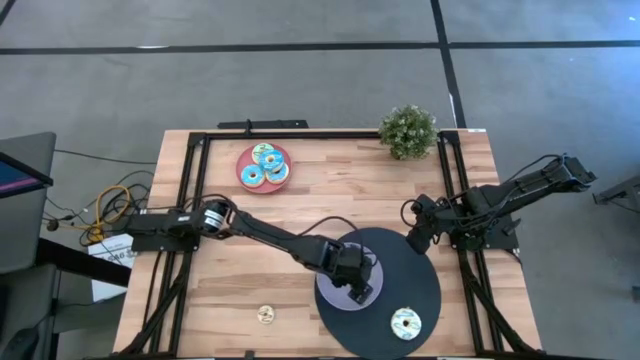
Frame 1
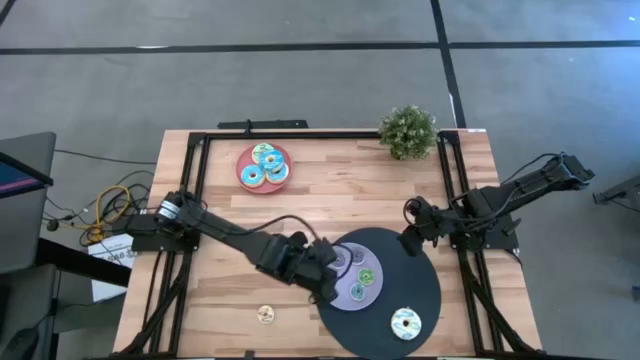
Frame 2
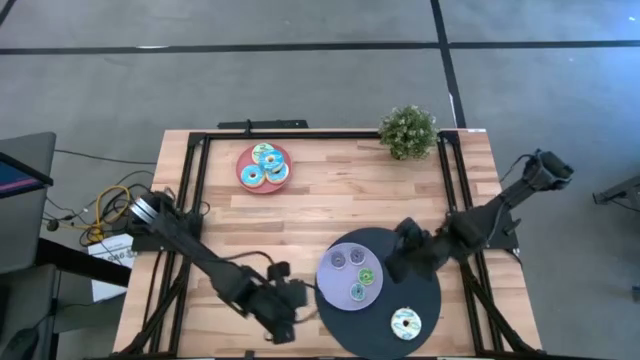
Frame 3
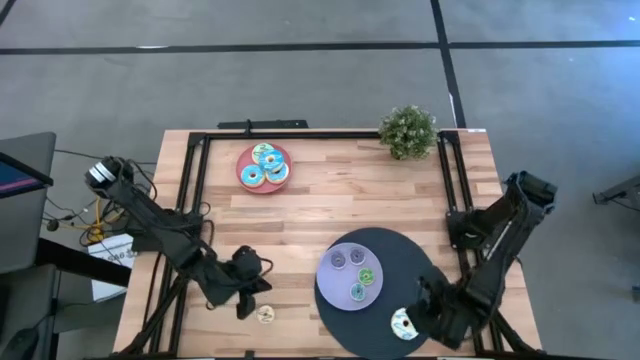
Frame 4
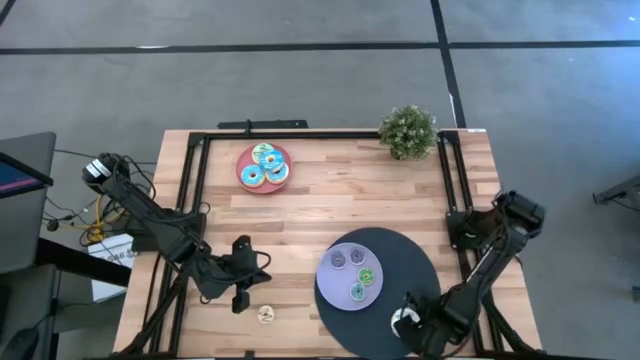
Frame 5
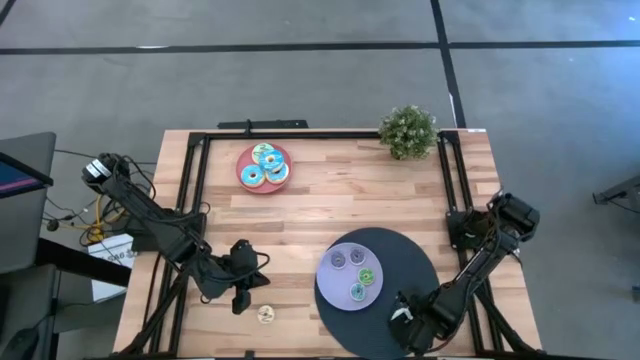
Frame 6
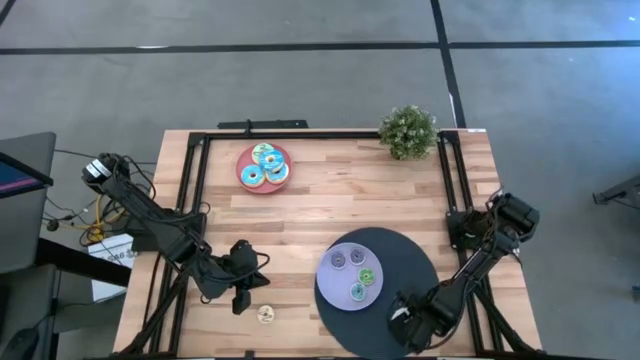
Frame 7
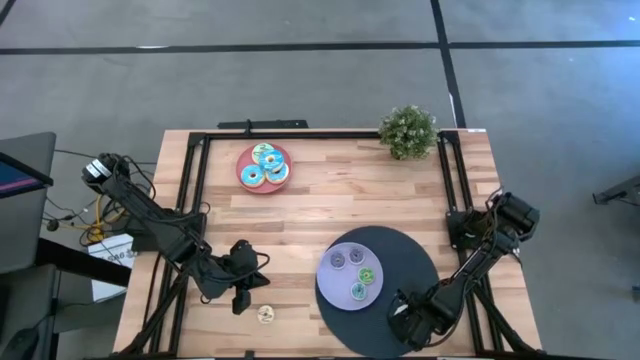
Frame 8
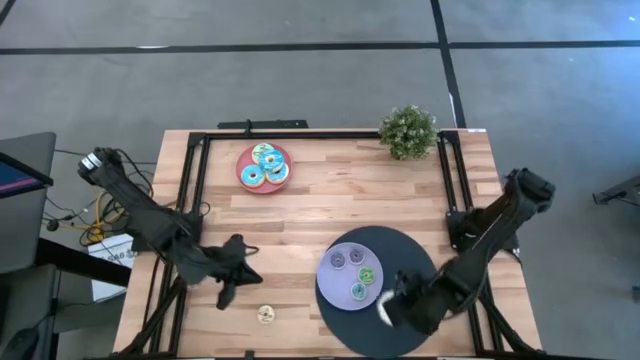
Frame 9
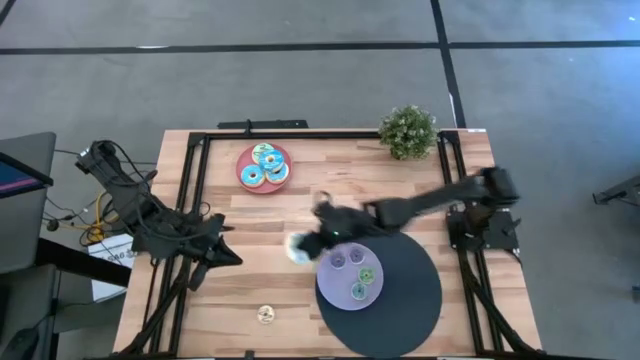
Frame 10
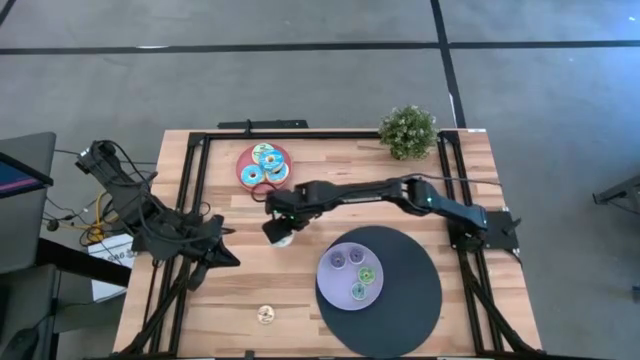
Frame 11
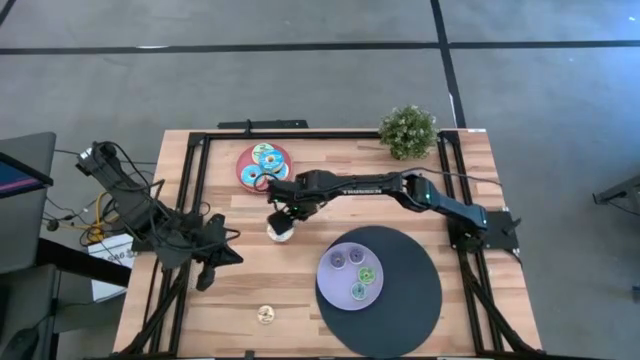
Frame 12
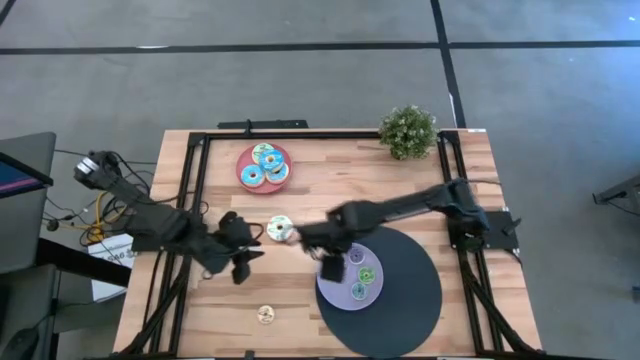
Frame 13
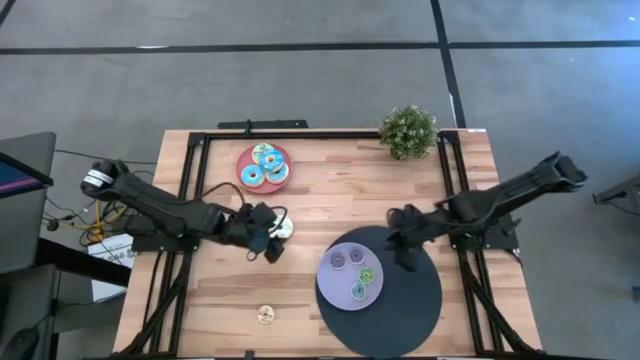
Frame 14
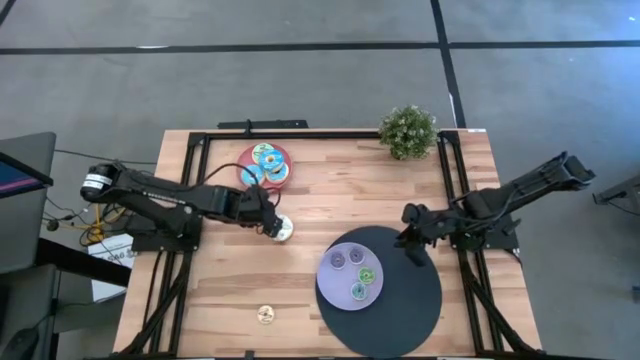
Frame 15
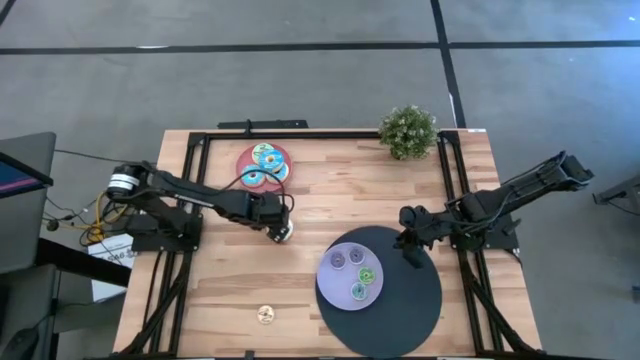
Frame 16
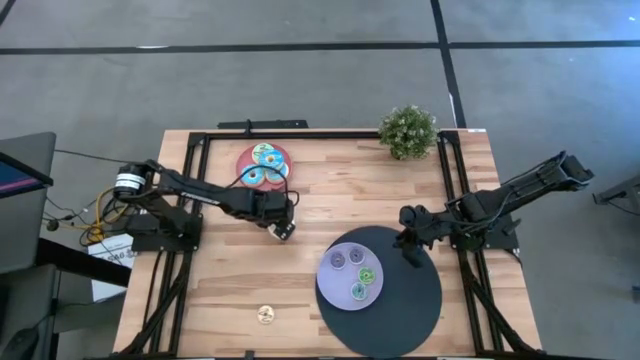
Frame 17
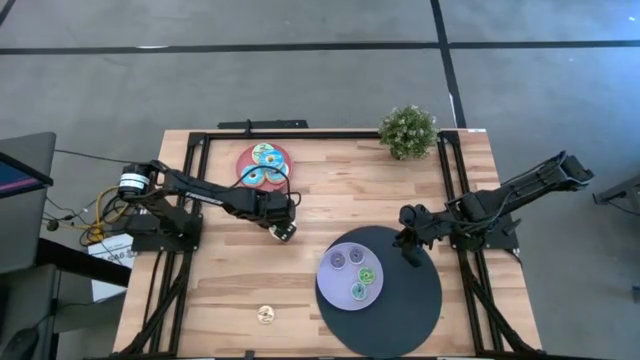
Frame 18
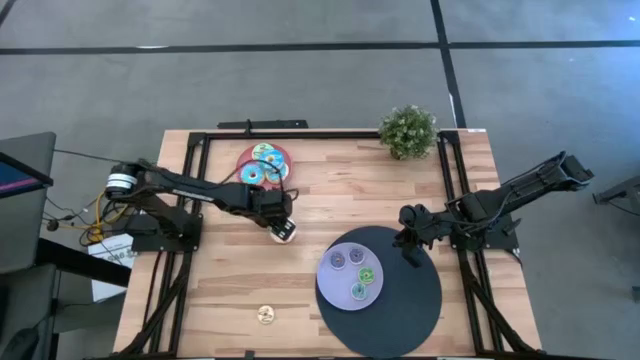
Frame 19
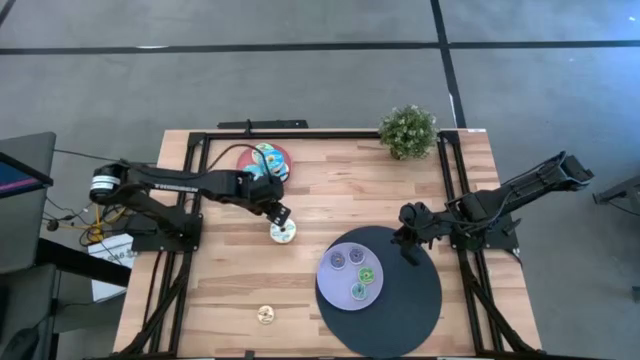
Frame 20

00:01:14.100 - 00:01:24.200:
Task: Pick & Place donuts
Put the large white donut on the pink plate

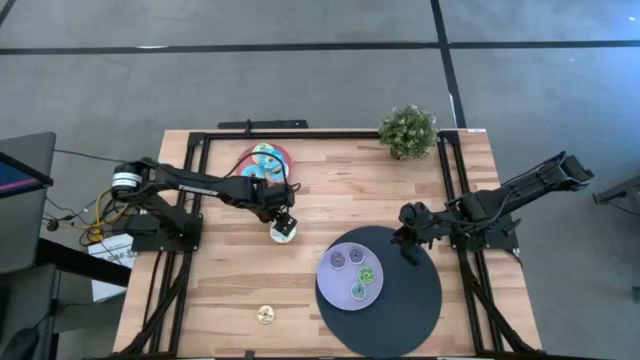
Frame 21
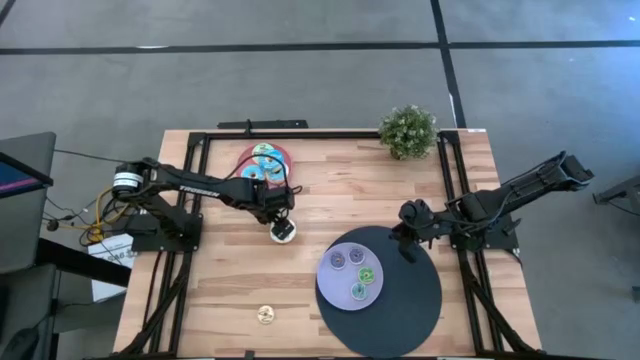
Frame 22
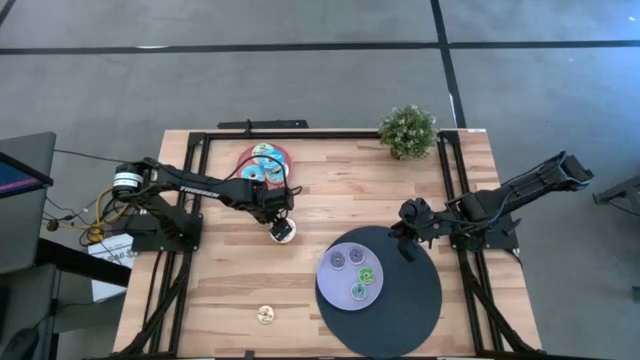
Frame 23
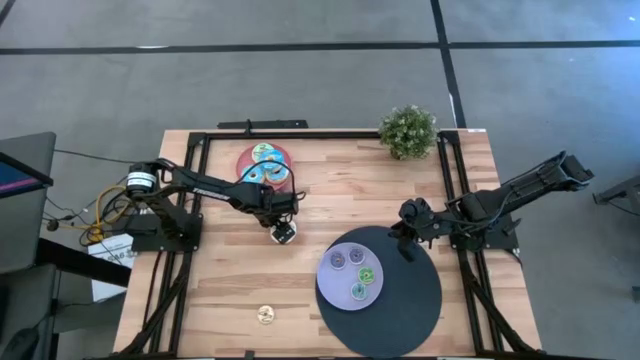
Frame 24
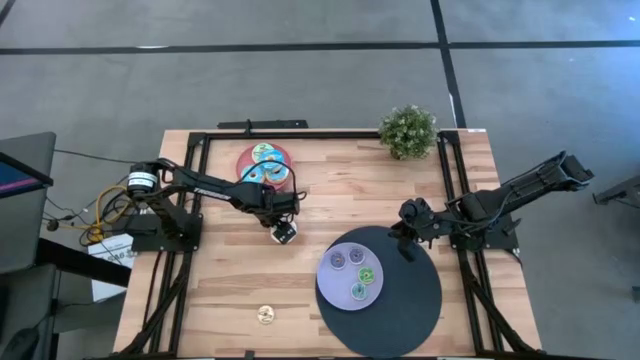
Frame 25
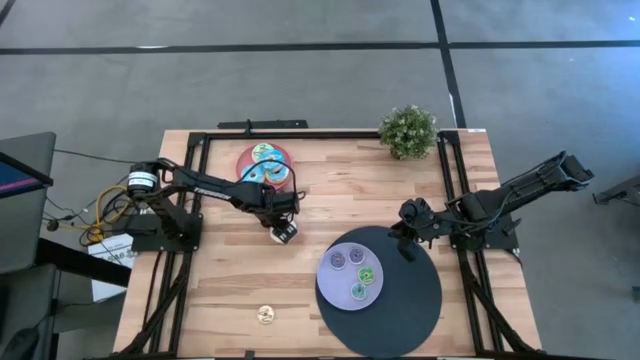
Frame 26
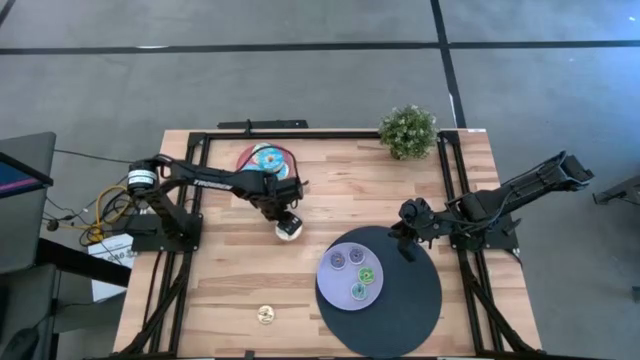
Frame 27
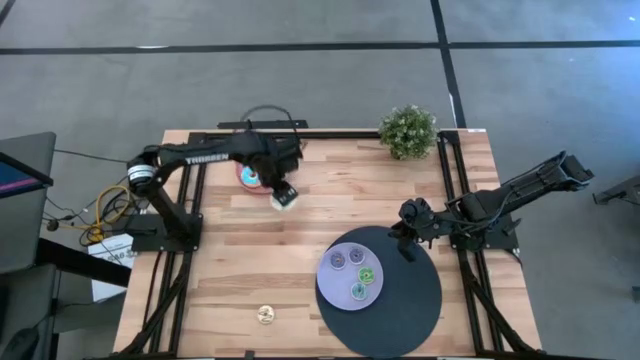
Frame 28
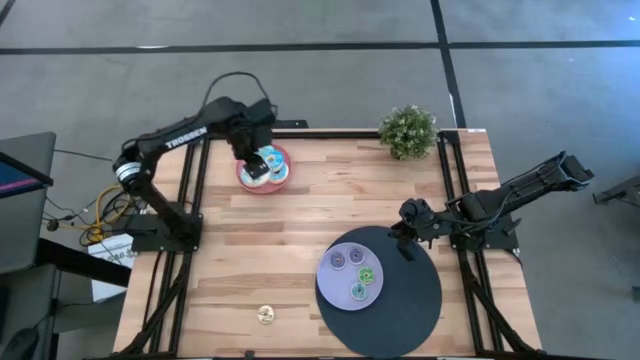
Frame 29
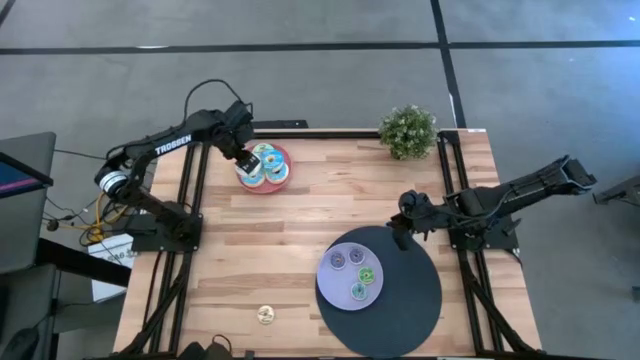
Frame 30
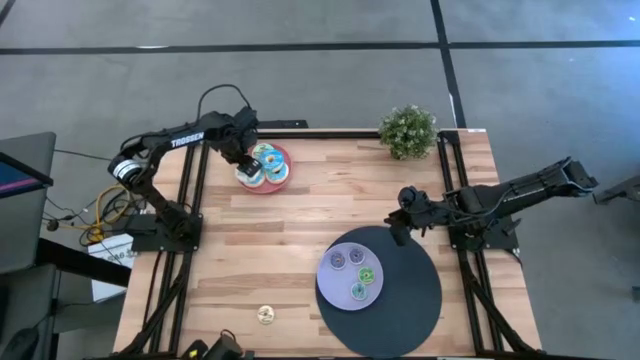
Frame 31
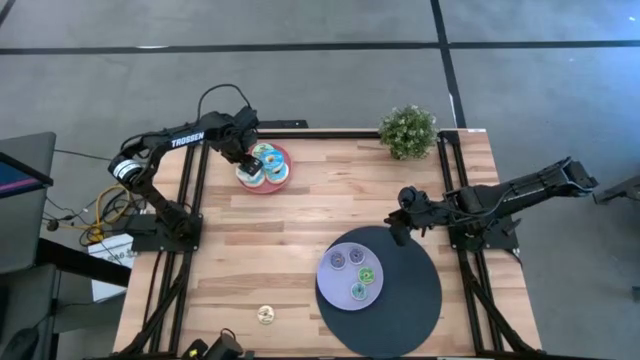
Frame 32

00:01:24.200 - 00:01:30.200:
Put the large white donut on the pink plate

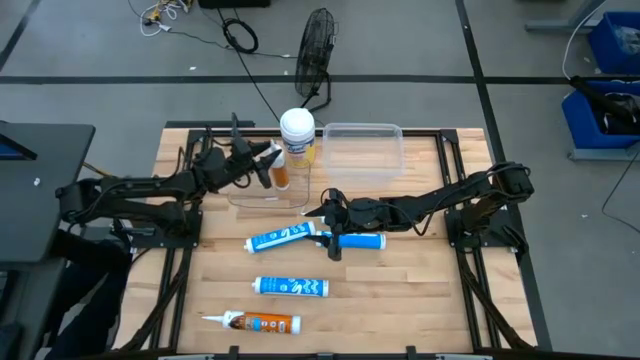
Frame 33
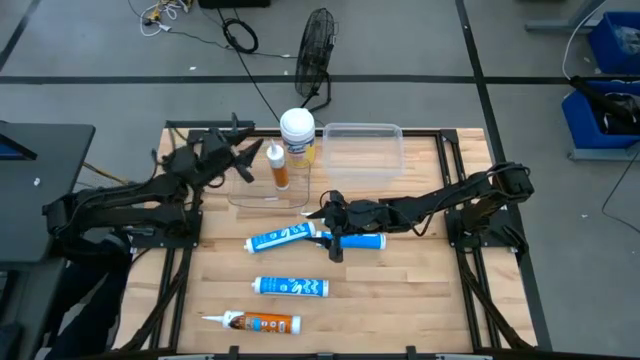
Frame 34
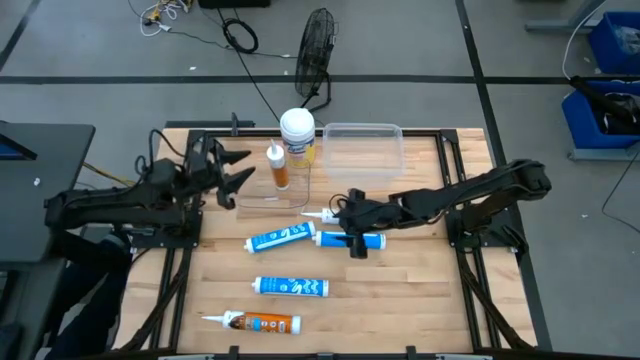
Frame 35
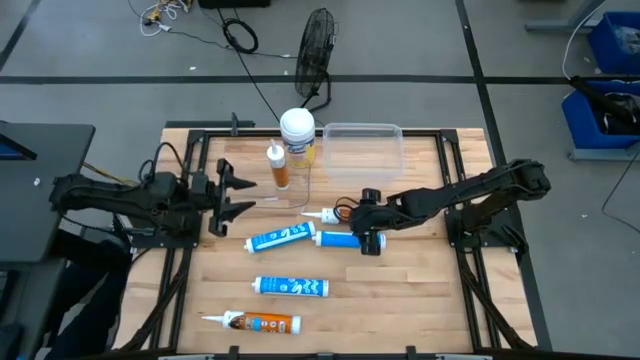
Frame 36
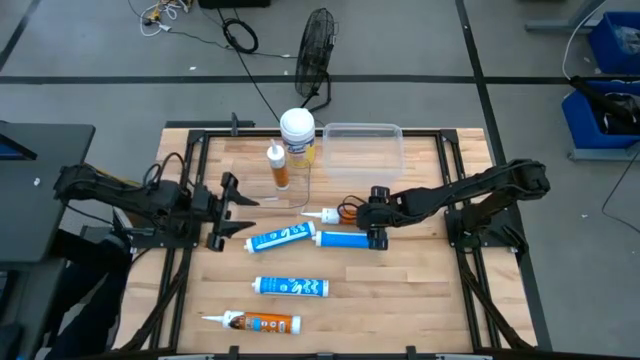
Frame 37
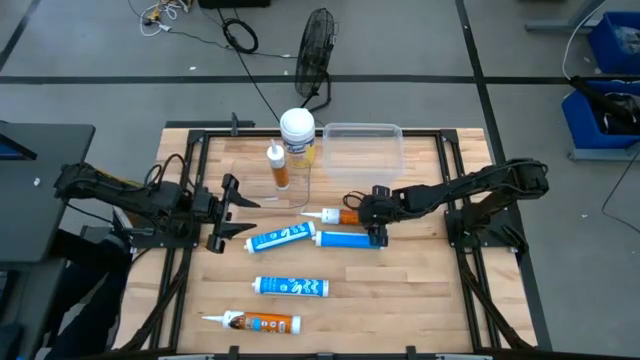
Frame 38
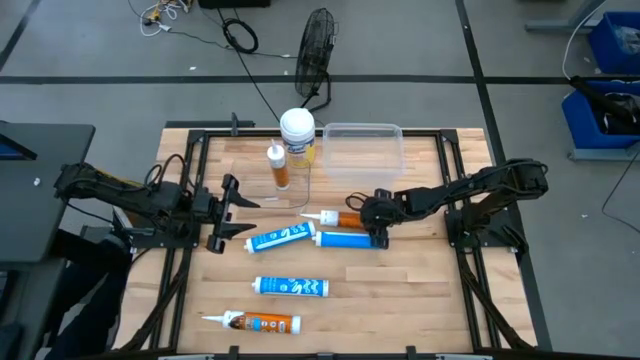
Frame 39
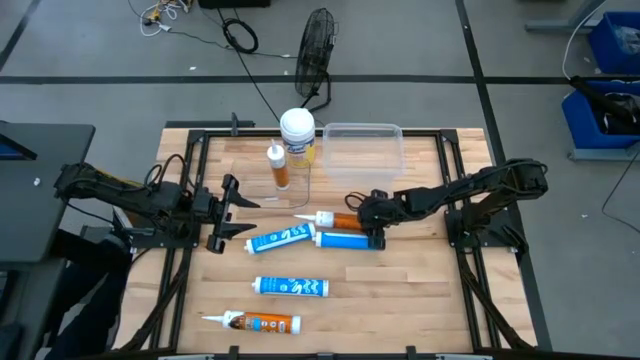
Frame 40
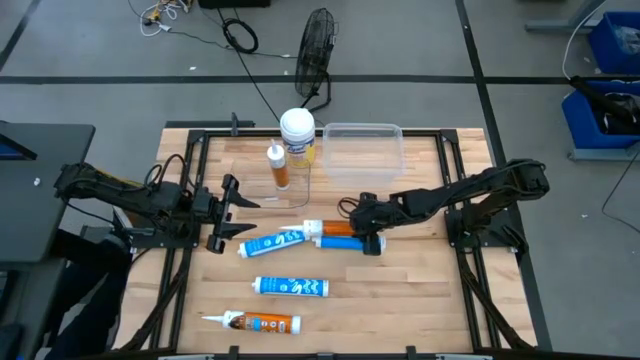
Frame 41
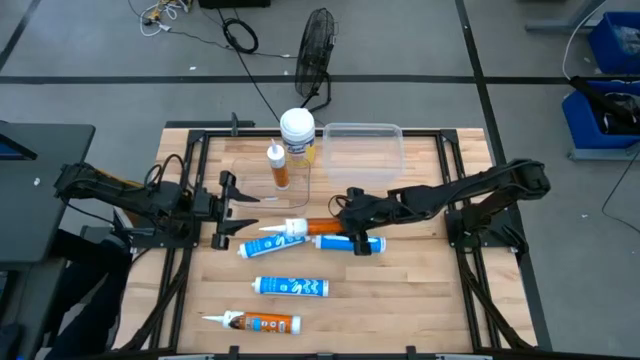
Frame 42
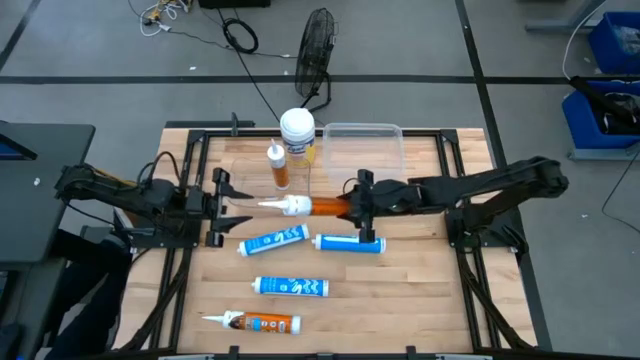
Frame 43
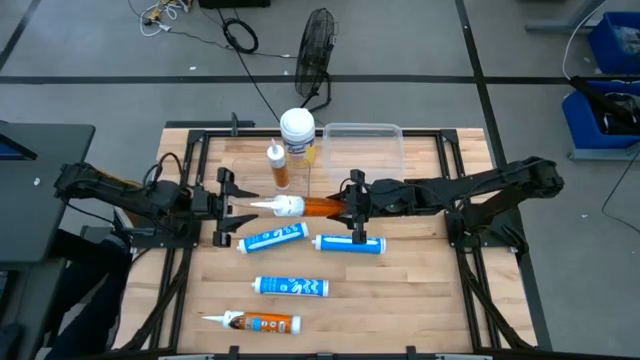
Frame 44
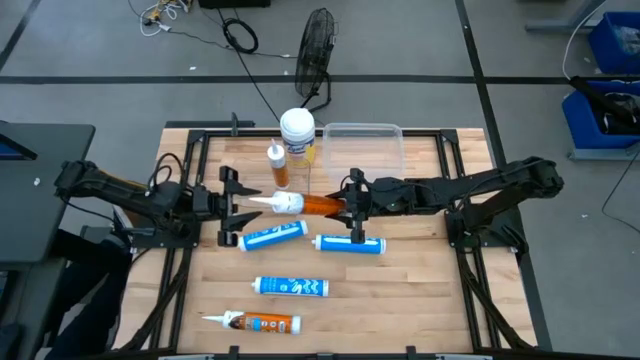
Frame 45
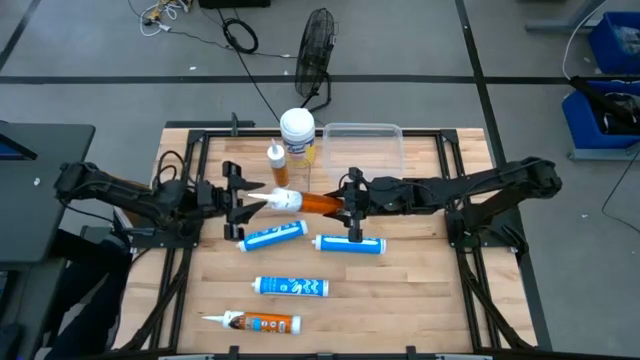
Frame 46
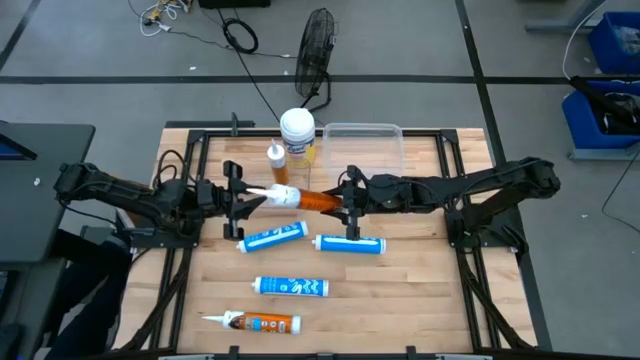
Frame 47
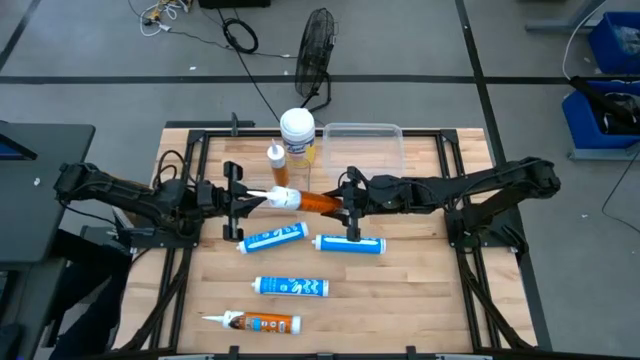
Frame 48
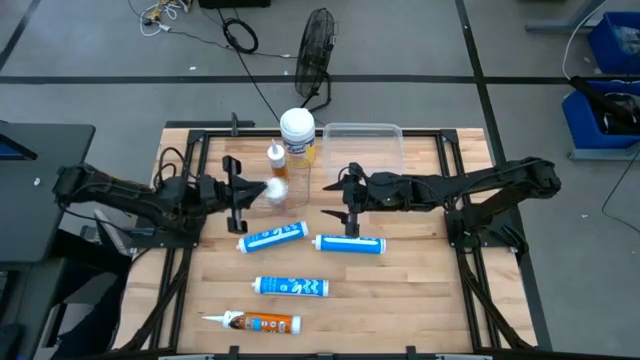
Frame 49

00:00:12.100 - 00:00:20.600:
Task: Pick & place silicon tubes, Sealant and Lysol wipes
Put the top orange sealant into the left transparent bin
